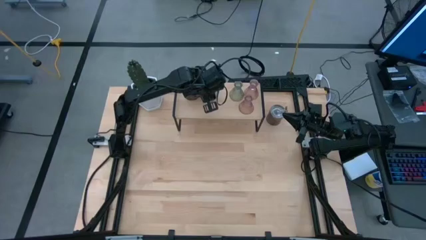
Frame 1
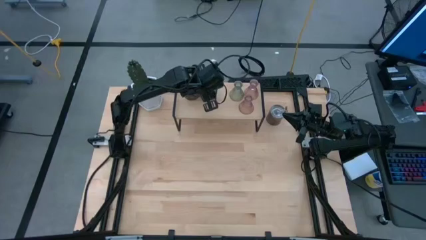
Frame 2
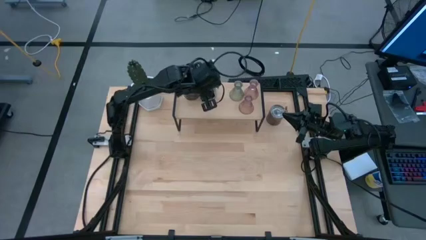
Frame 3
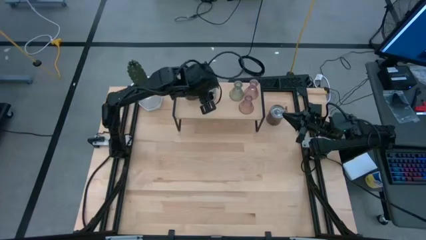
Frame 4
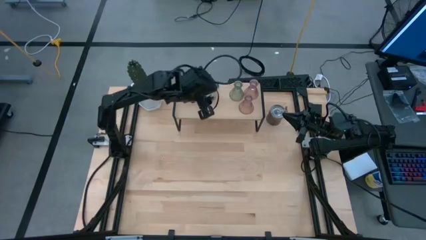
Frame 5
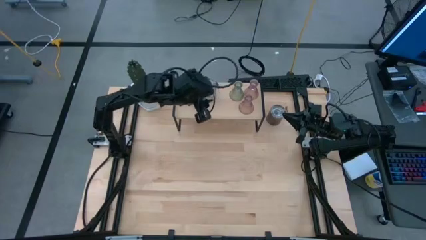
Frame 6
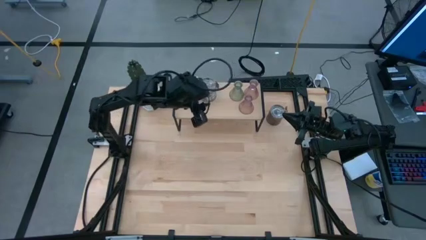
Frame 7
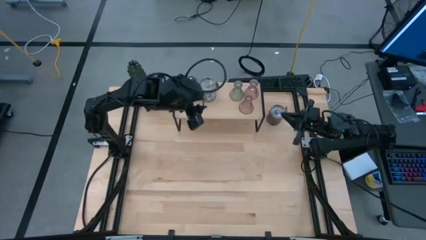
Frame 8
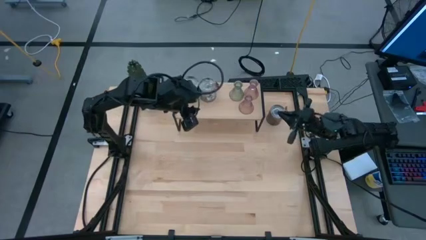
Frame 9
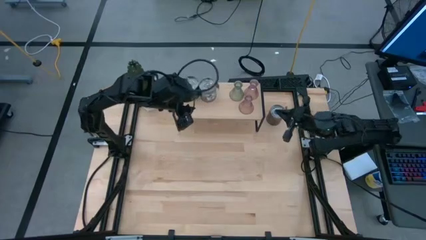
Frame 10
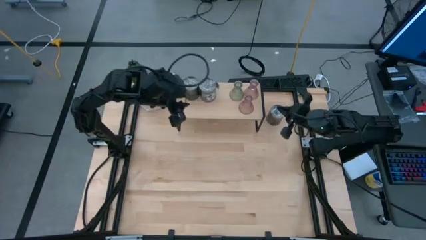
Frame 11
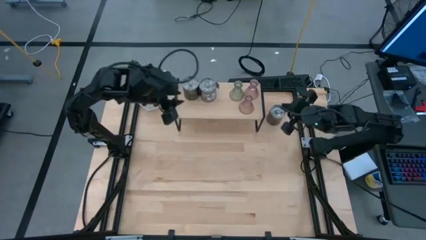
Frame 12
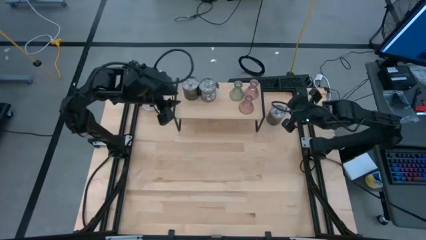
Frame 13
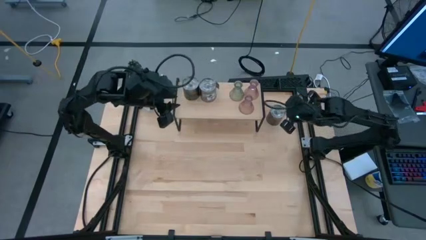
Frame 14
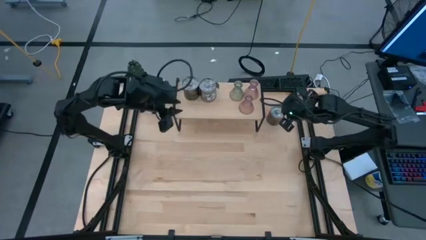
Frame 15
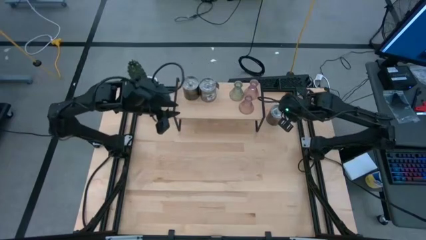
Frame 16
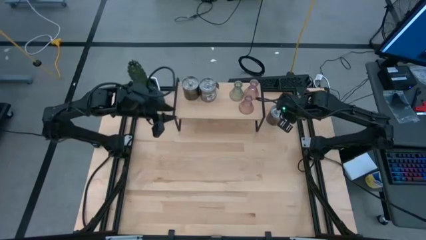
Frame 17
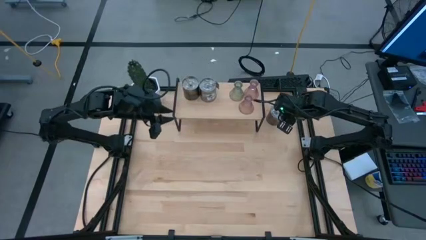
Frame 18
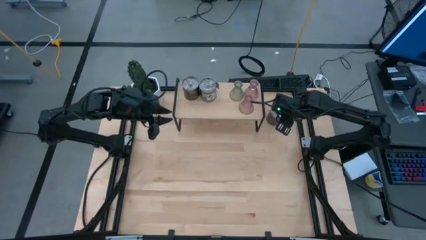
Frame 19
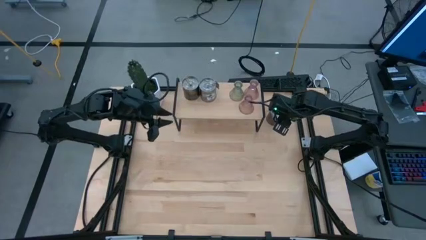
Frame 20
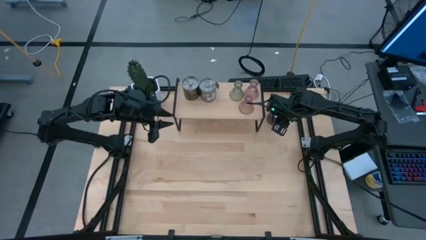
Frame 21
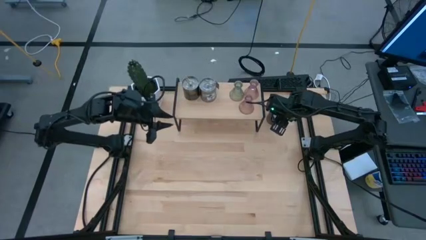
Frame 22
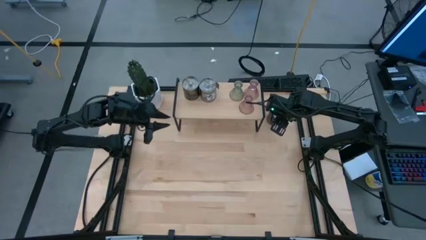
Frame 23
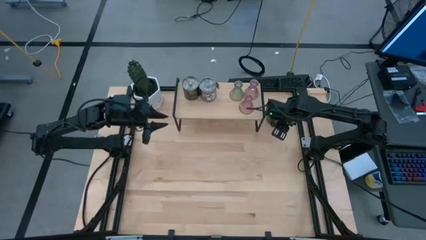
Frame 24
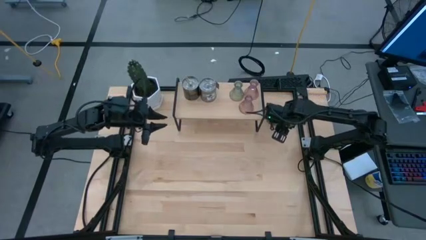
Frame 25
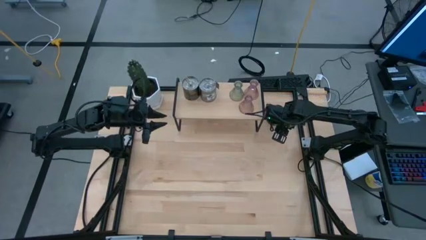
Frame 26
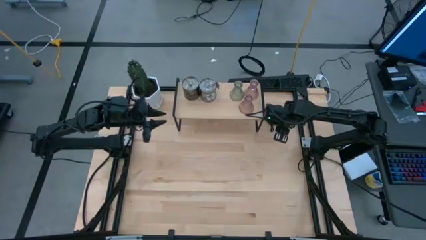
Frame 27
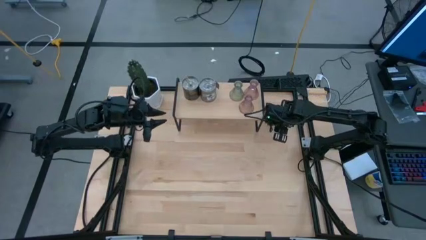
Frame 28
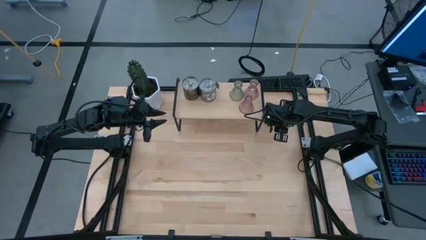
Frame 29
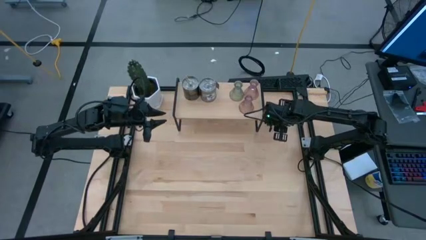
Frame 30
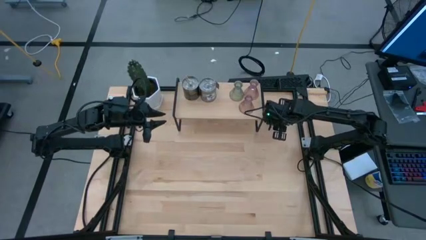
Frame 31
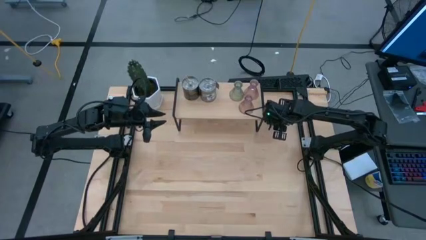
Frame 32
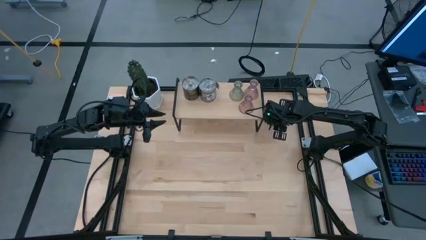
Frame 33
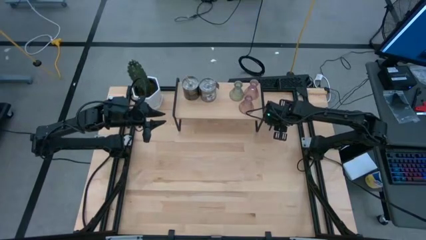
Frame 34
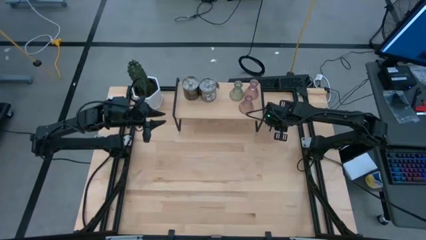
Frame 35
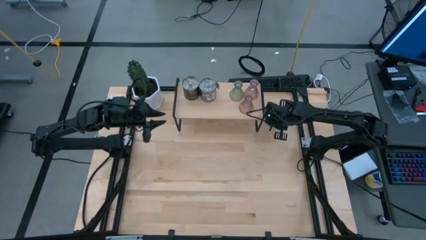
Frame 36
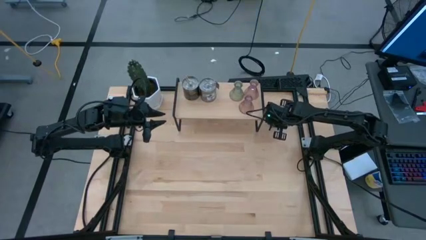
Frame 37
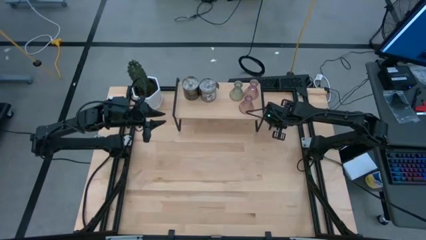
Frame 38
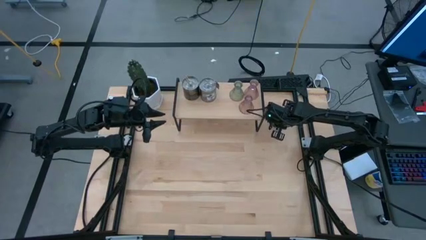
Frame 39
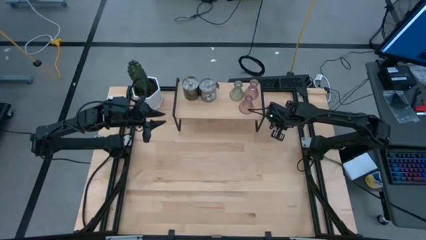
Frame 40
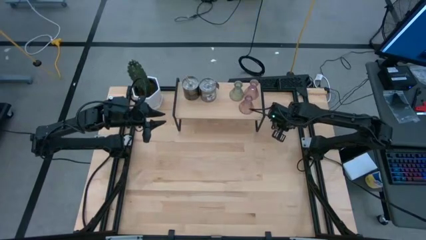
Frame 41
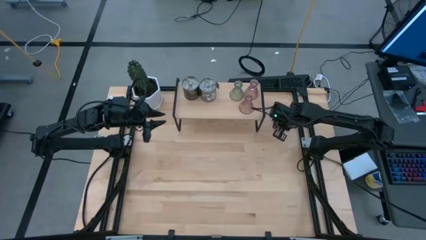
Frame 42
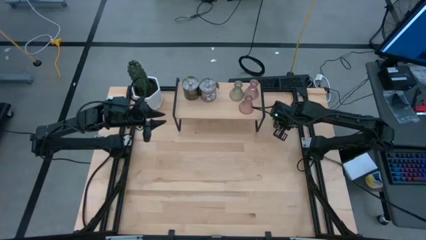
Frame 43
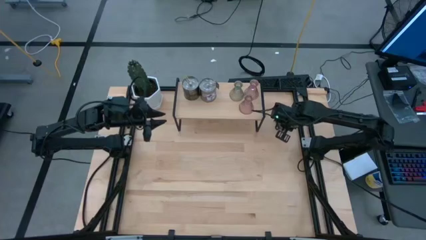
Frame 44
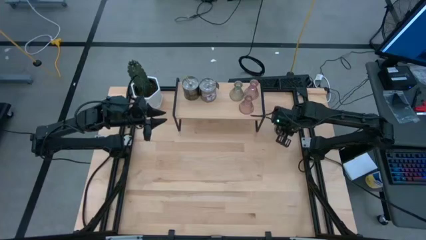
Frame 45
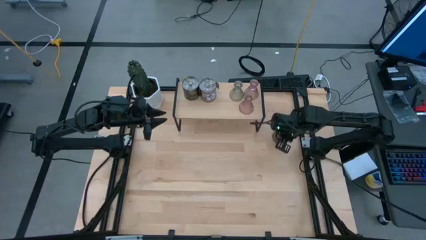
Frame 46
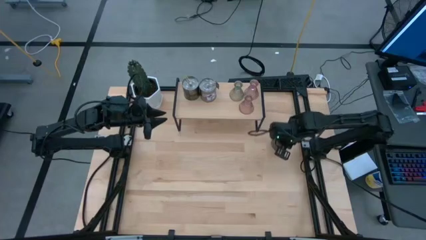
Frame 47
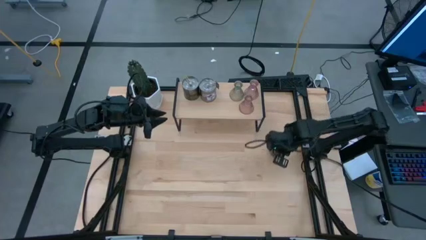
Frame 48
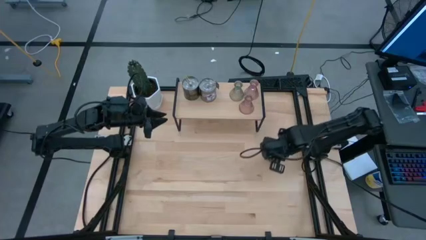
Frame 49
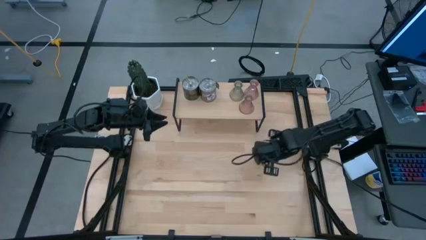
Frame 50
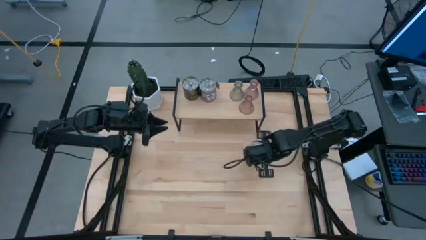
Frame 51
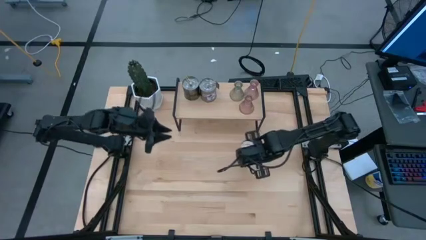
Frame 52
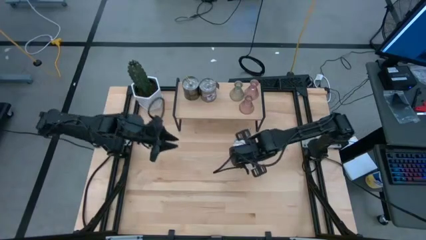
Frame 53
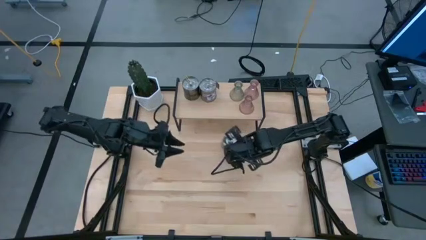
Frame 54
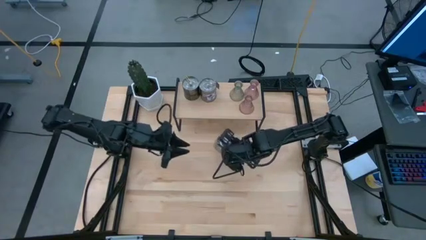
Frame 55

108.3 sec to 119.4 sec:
Task: Pick & Place candle stick holders
Put the brown scented candle on the shelf

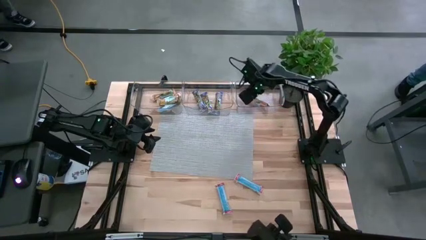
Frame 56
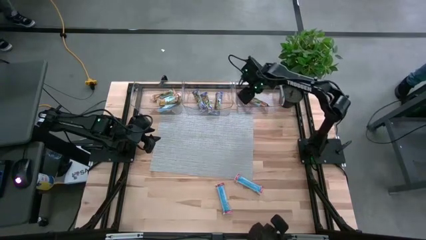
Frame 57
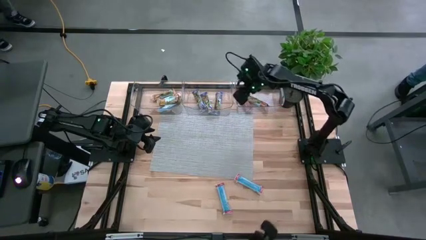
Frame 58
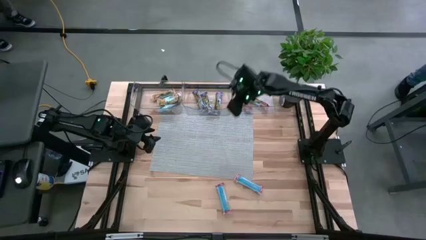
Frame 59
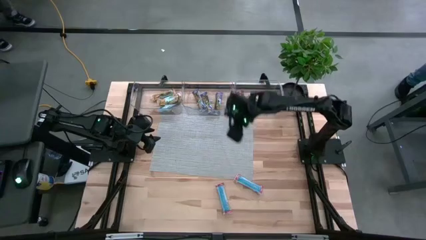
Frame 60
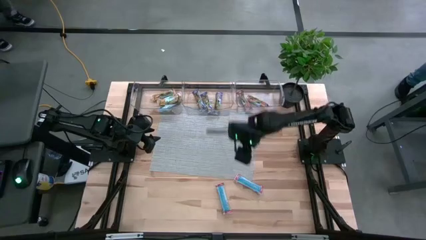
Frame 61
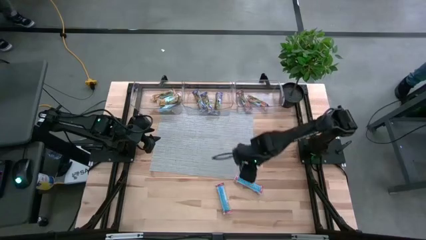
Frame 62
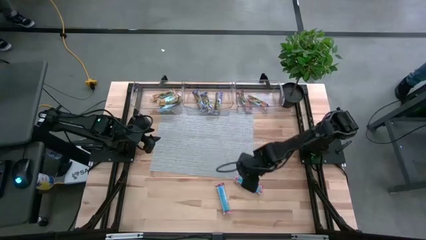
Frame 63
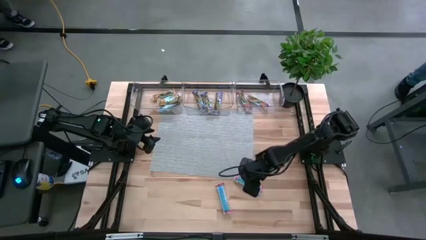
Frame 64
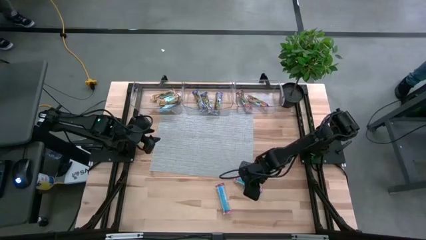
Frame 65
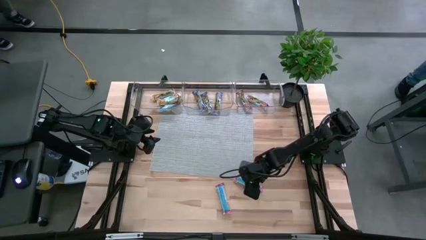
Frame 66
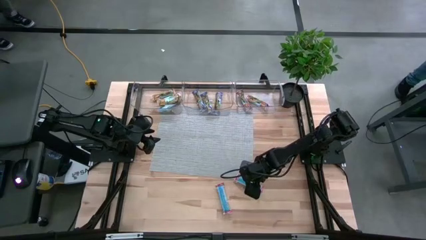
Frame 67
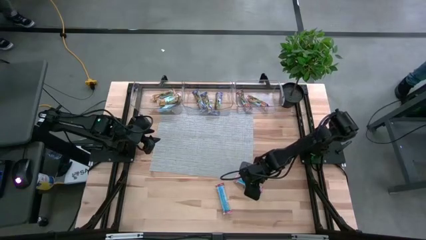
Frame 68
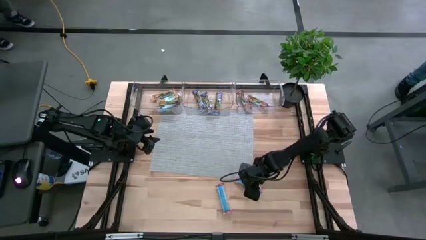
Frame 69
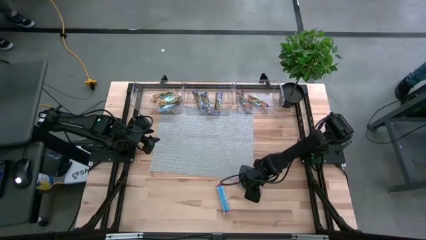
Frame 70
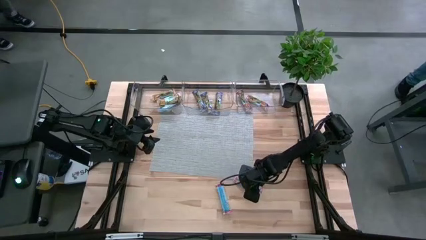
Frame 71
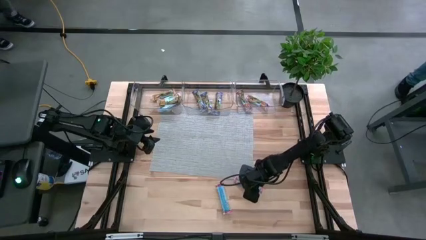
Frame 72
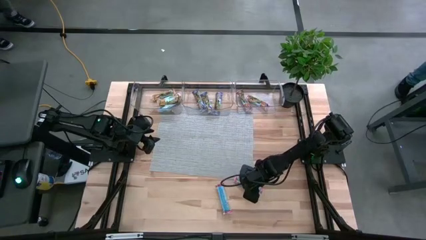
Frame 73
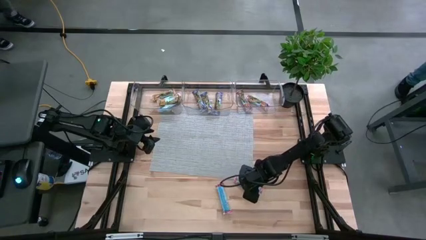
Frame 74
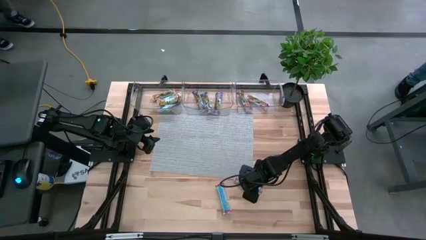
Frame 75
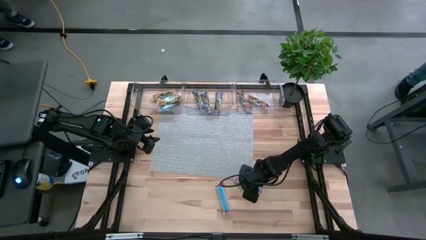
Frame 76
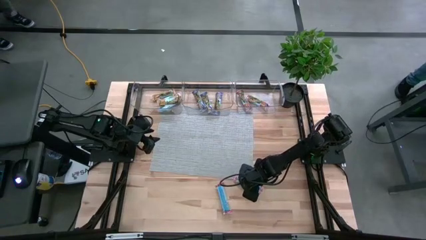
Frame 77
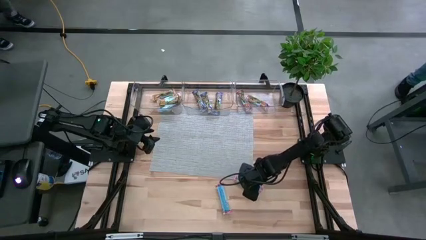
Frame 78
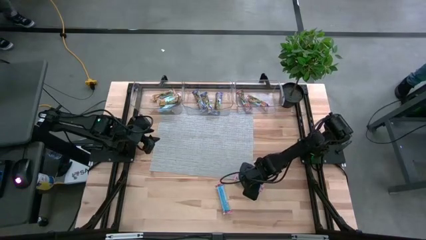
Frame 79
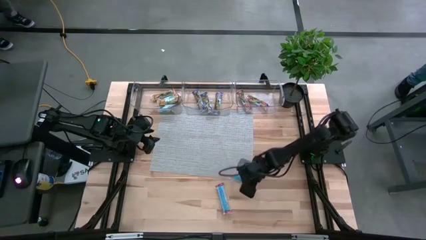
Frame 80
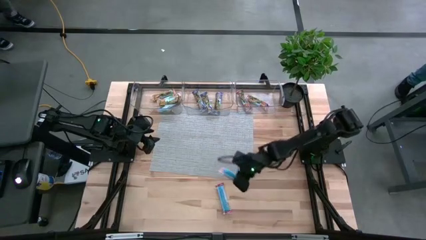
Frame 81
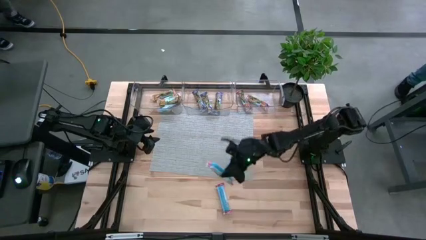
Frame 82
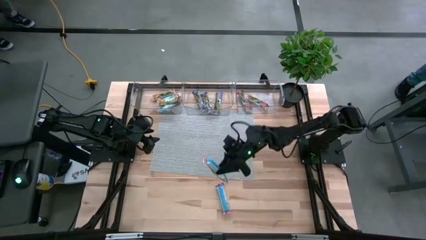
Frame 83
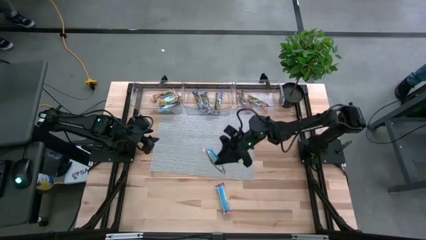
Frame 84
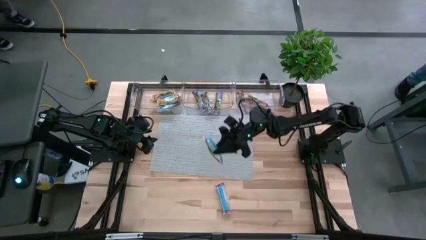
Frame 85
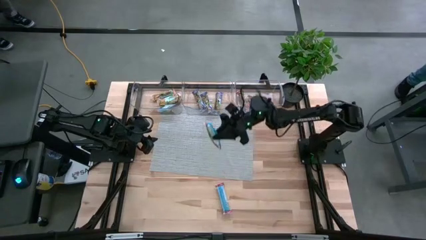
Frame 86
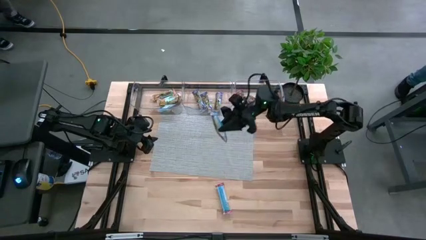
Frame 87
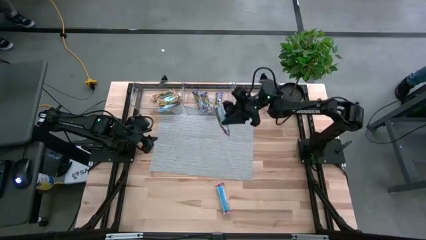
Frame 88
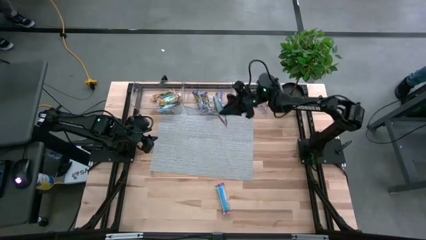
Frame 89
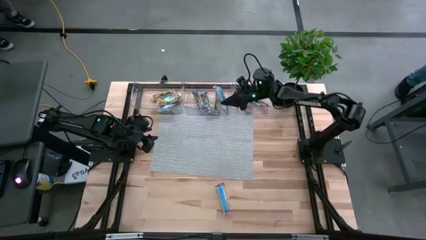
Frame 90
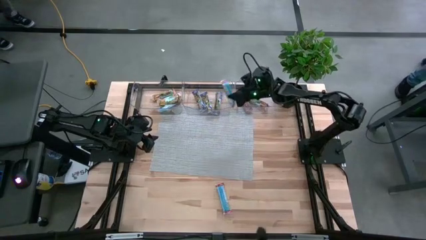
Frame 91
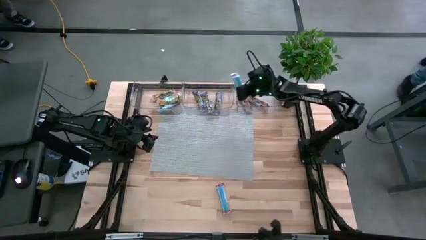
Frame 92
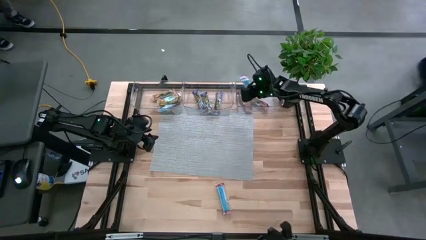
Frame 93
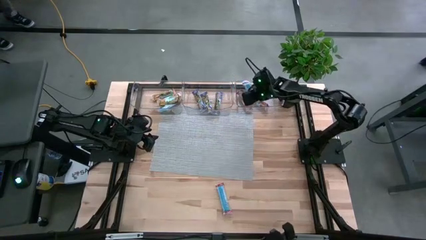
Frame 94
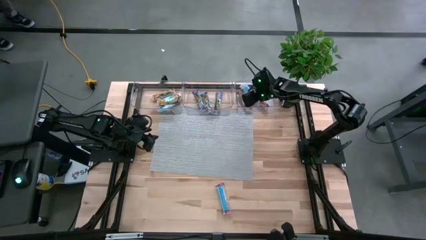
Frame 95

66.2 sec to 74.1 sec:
Task: Pick and place Granola Bars by type
Put the red granola bar into the right transparent bin
